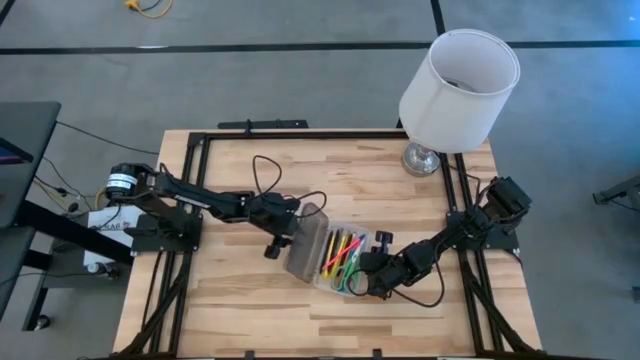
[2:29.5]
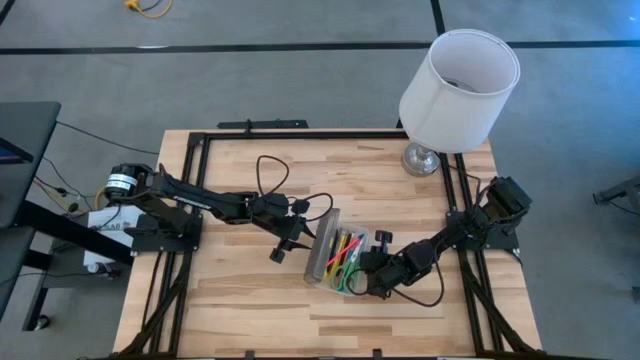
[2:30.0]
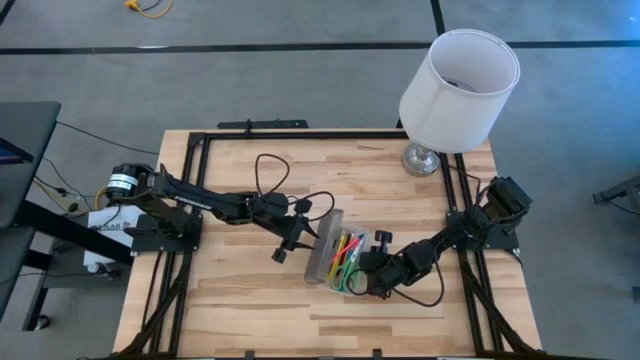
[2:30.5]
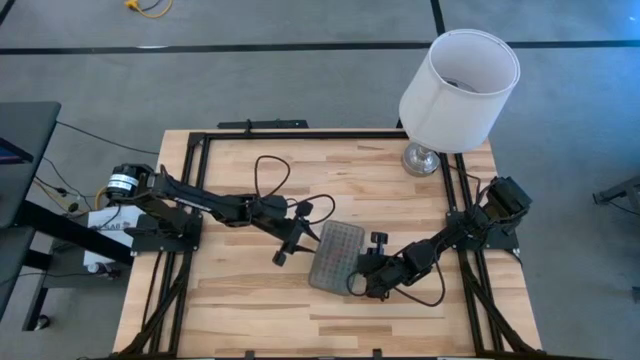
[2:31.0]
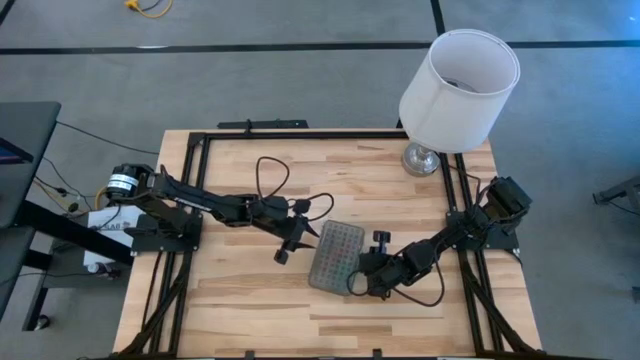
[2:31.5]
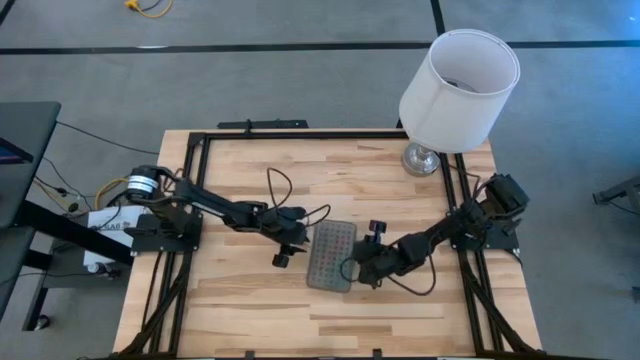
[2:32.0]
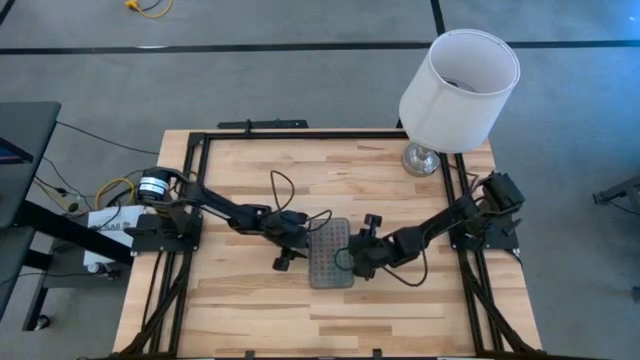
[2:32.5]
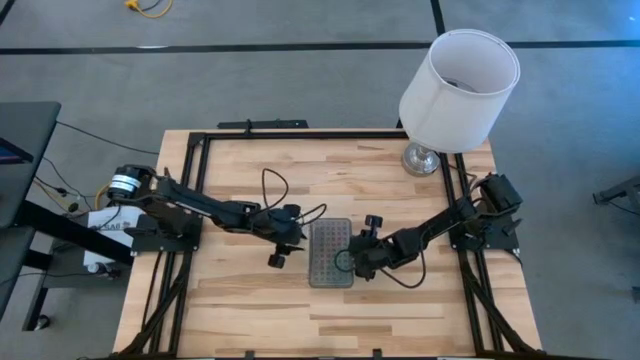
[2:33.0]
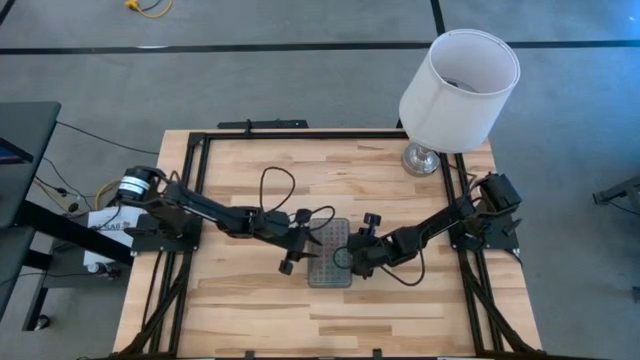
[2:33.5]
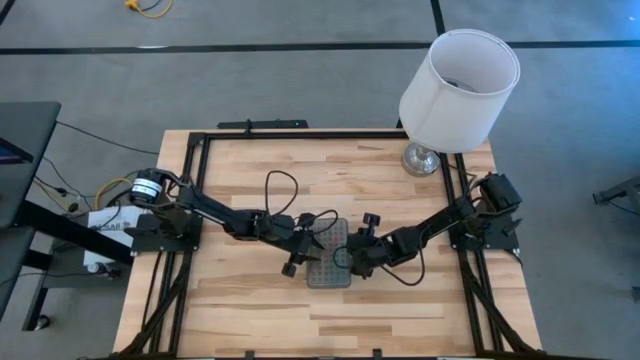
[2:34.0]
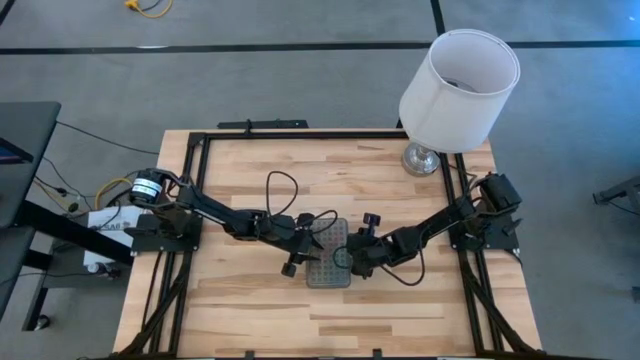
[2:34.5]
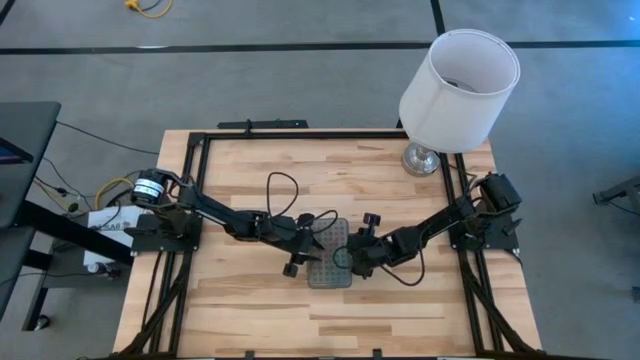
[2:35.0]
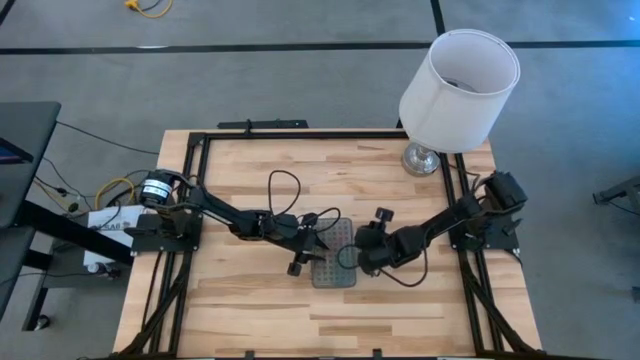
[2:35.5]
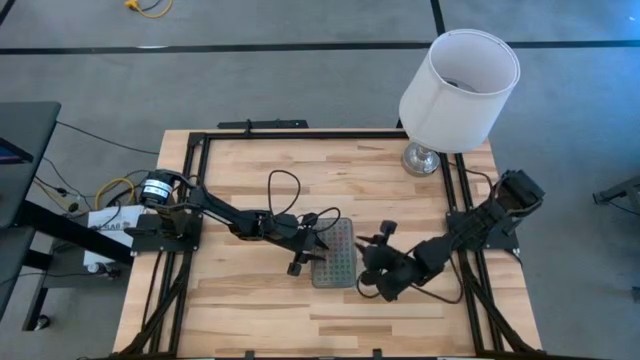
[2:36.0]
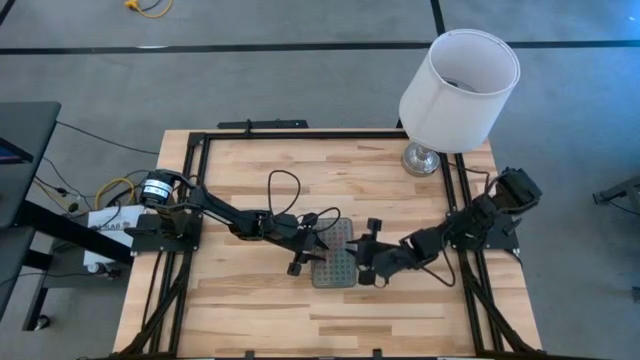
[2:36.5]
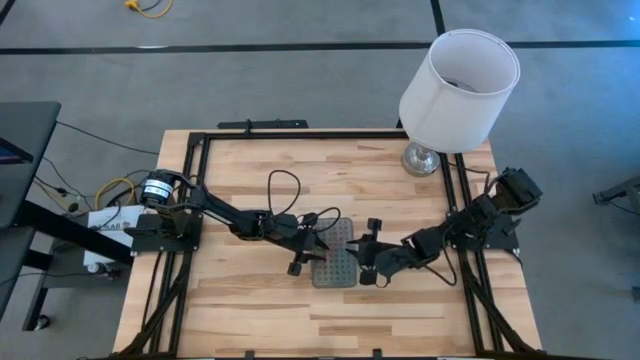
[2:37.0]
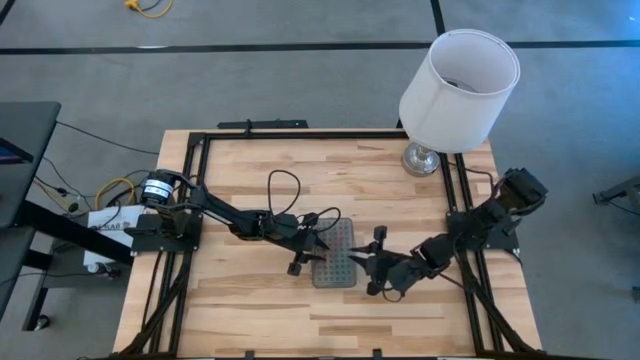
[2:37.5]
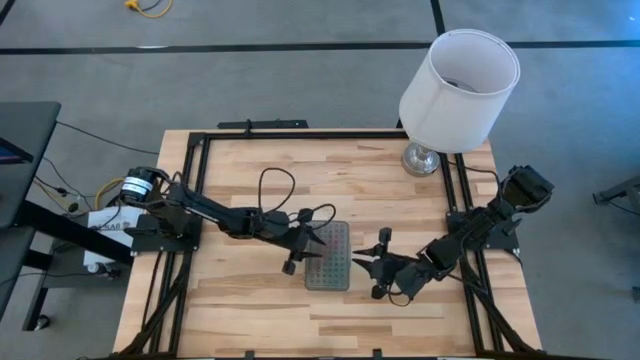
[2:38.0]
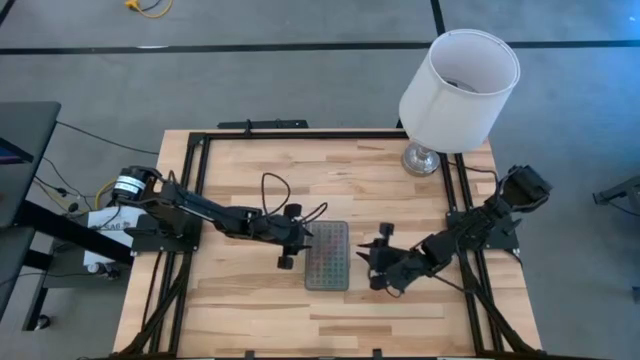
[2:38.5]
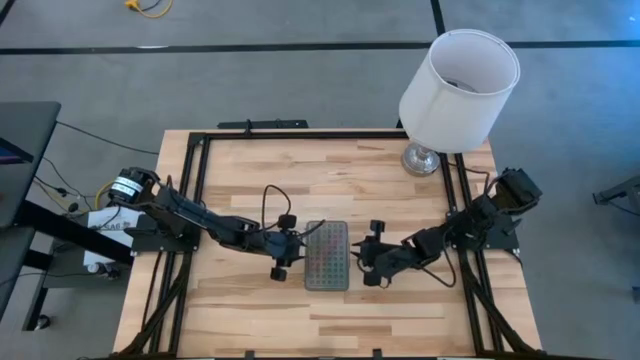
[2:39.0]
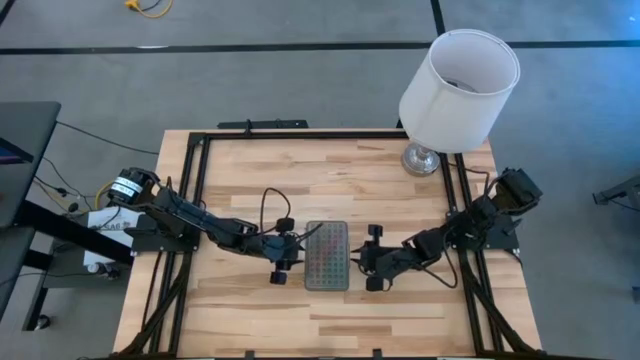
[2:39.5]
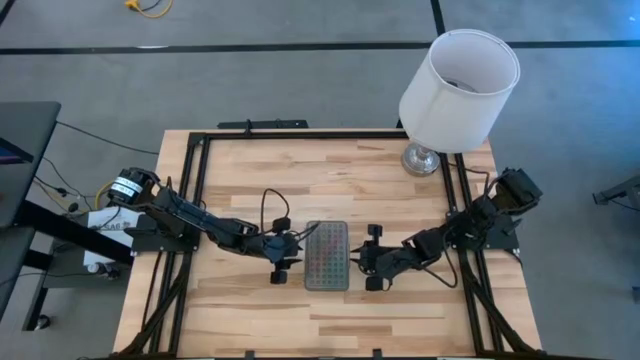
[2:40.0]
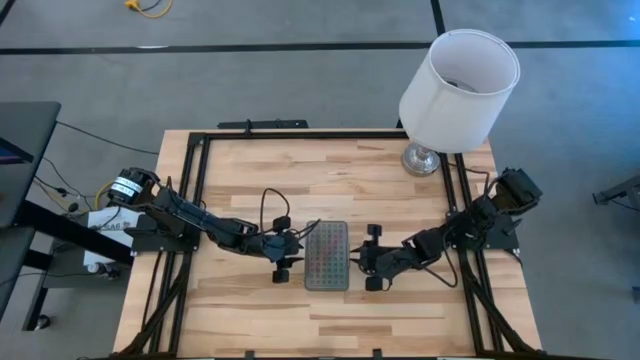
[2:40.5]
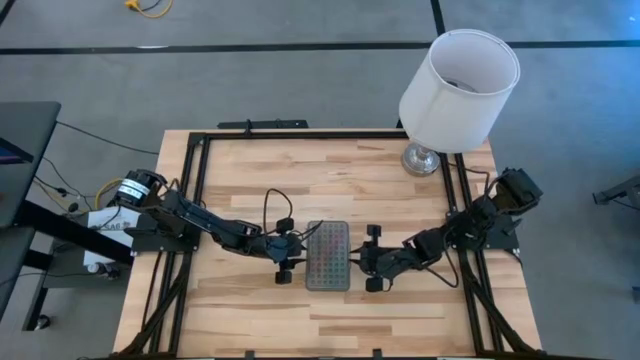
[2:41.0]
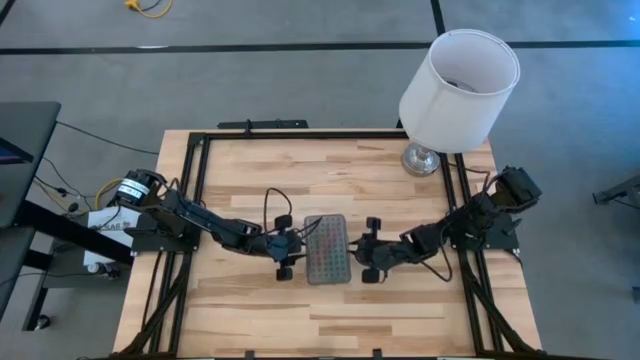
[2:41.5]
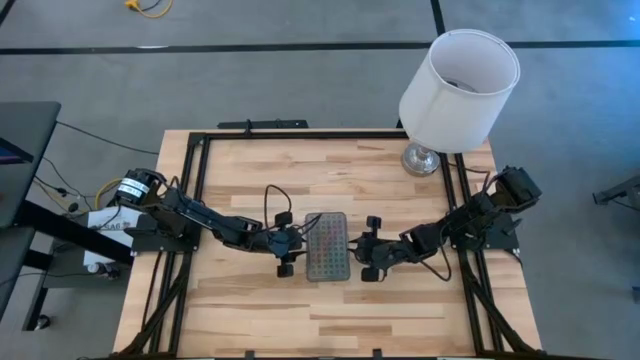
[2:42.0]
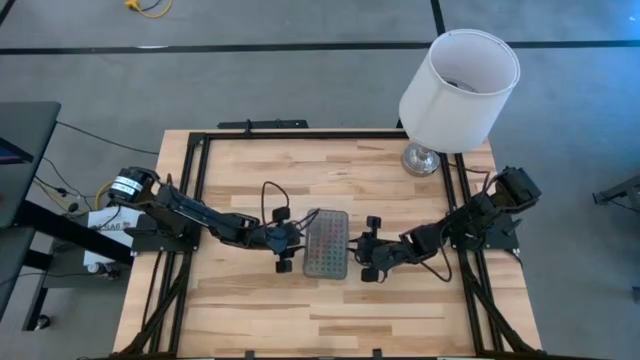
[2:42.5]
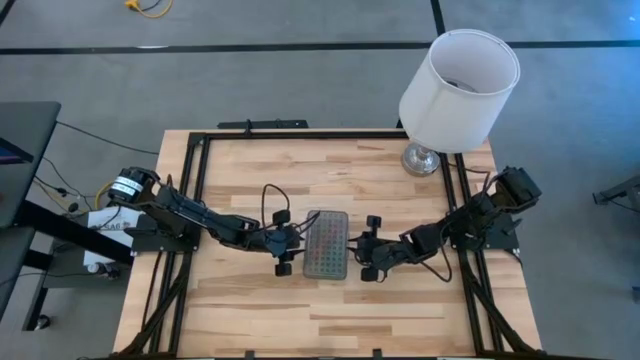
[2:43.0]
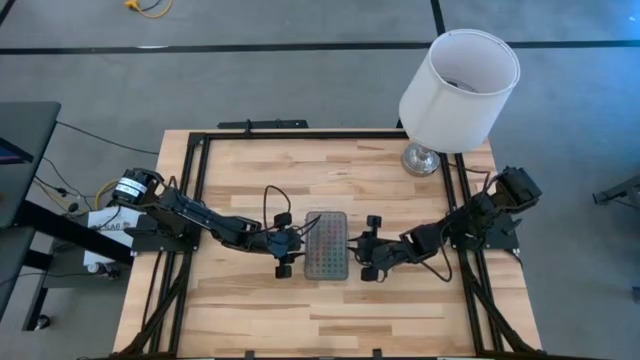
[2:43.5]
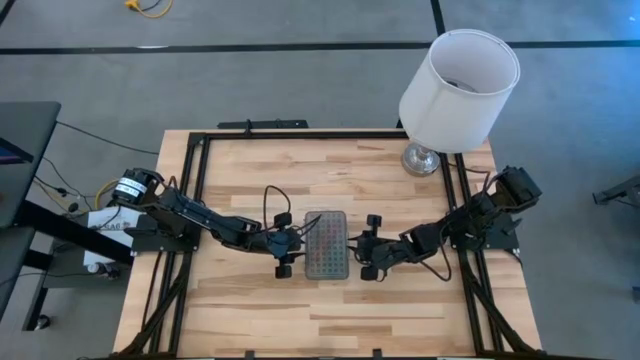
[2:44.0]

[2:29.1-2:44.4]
Task: Pick & place school supplies into a supply box
Close the gray supply box

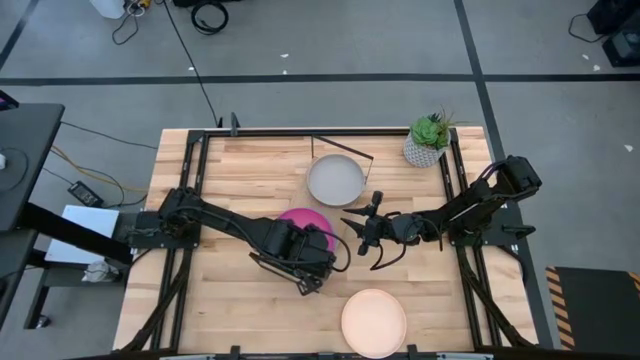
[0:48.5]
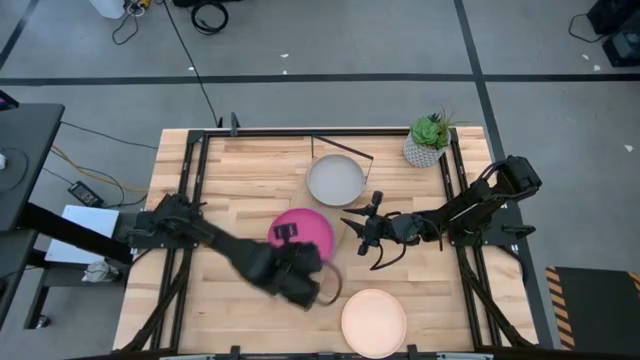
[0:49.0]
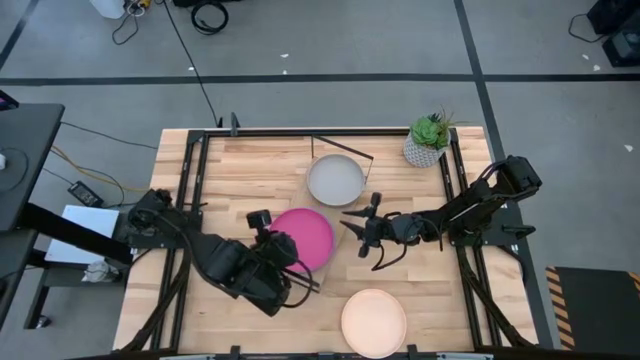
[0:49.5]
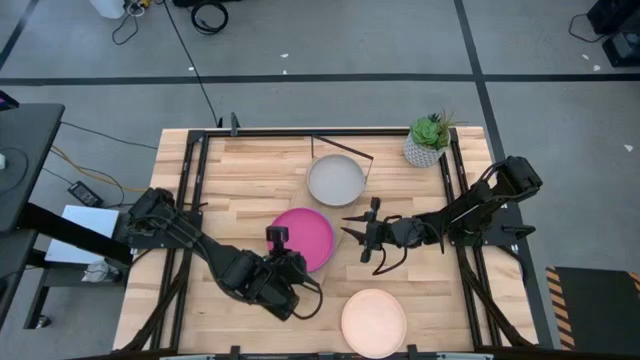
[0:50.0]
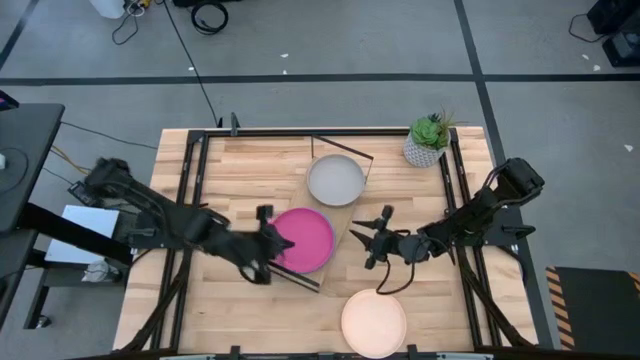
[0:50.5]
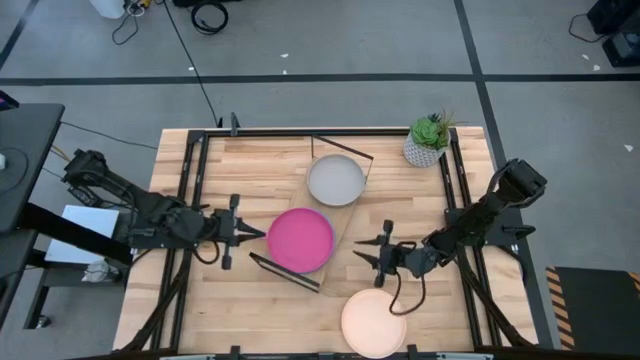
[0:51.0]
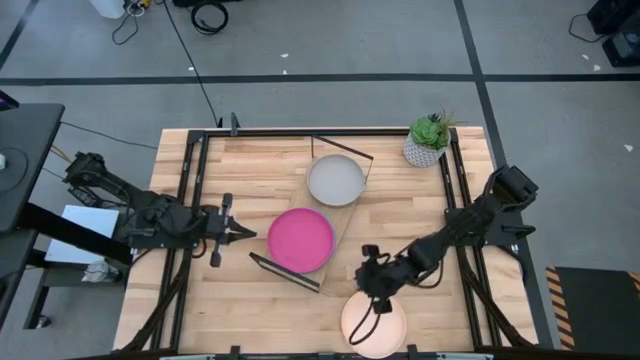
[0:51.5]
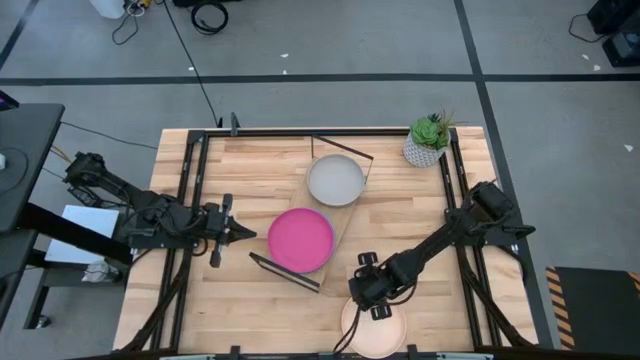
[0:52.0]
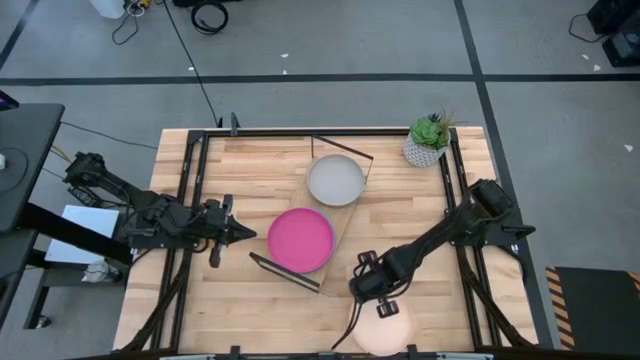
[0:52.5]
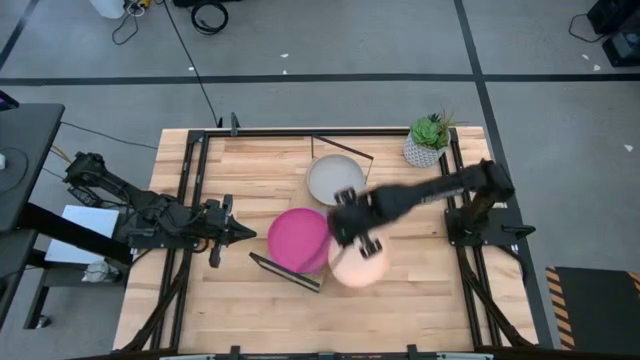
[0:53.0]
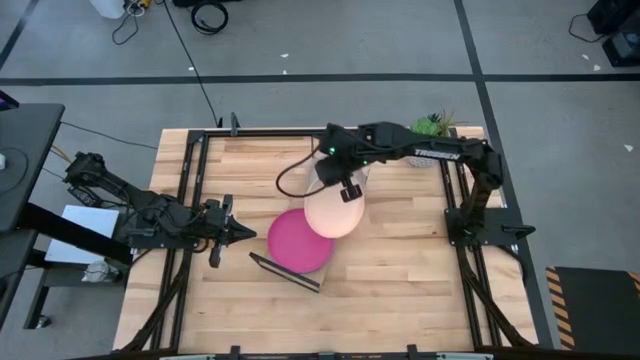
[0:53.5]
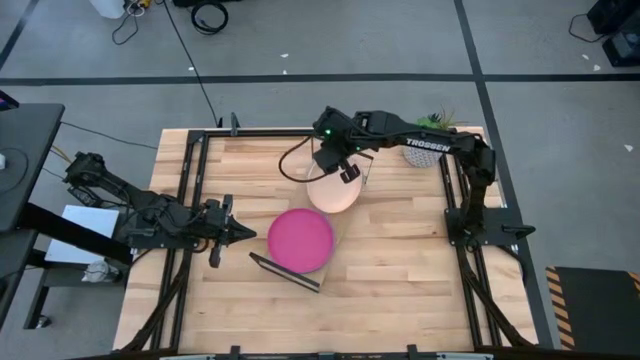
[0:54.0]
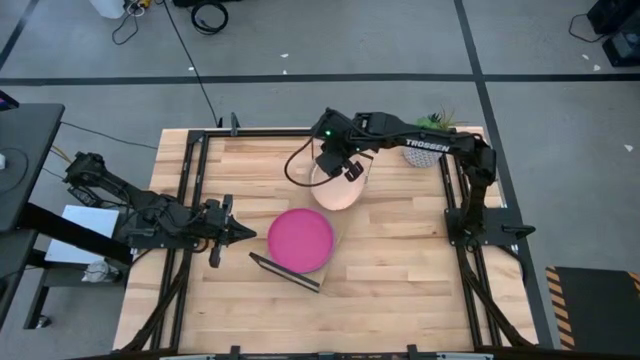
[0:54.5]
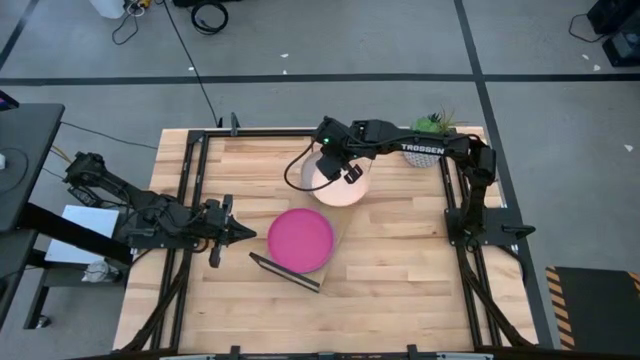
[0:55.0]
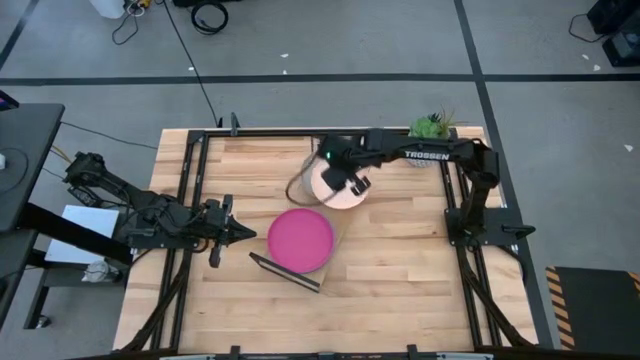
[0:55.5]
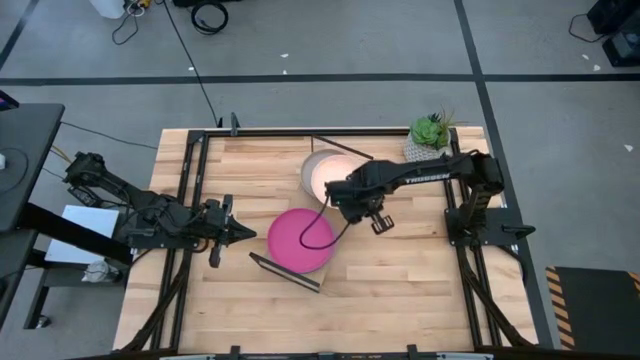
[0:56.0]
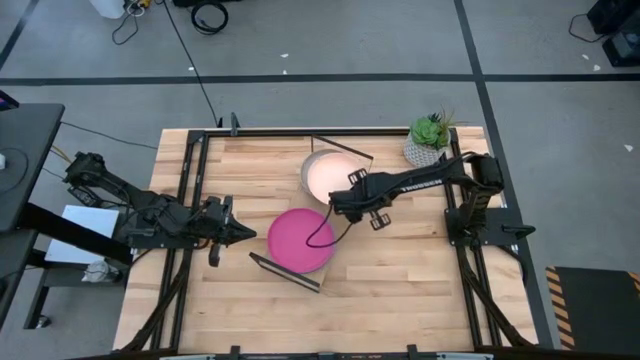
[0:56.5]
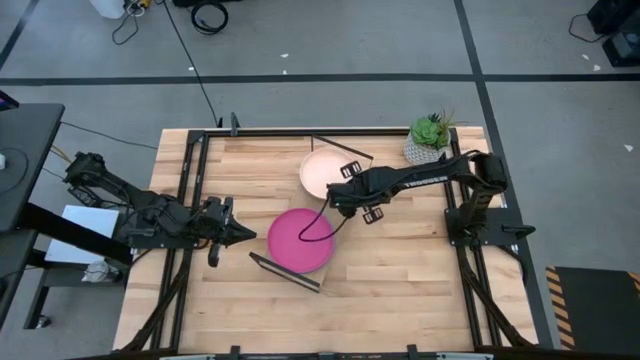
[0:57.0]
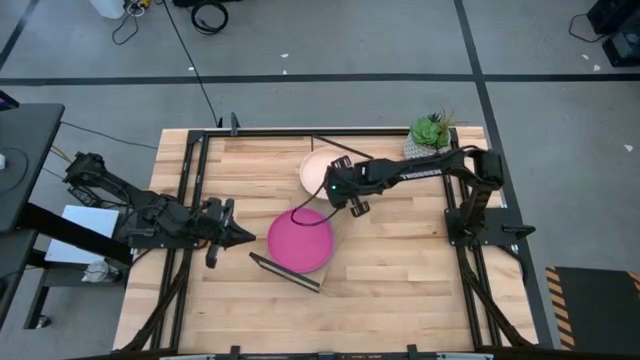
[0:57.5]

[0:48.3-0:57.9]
Task: Place and stack plates onto a shelf
Stack the white plate on the top of the gray plate on the shelf
